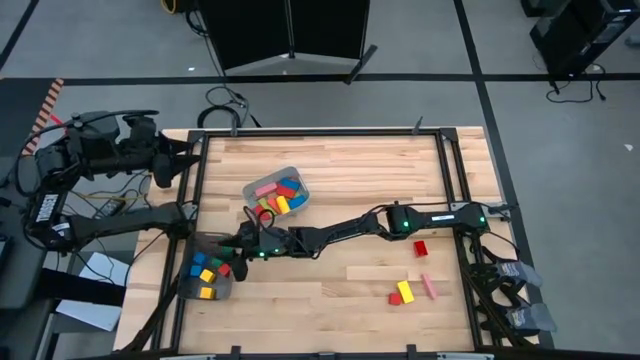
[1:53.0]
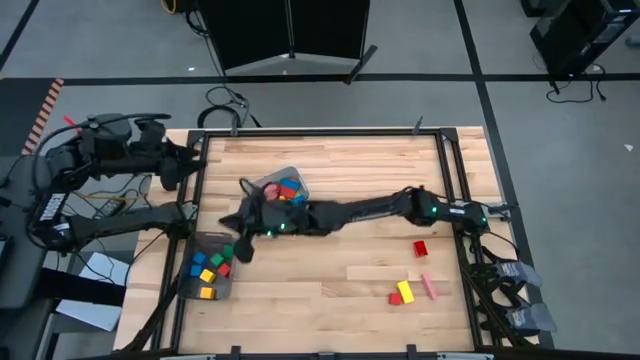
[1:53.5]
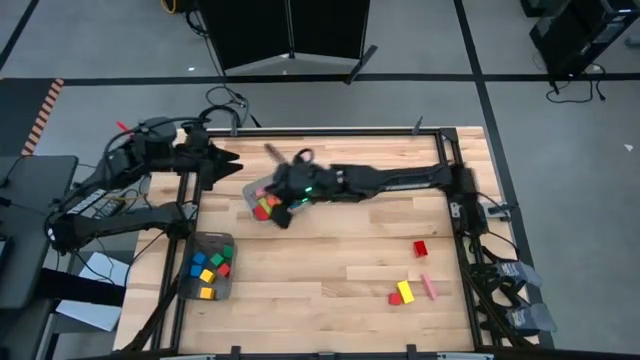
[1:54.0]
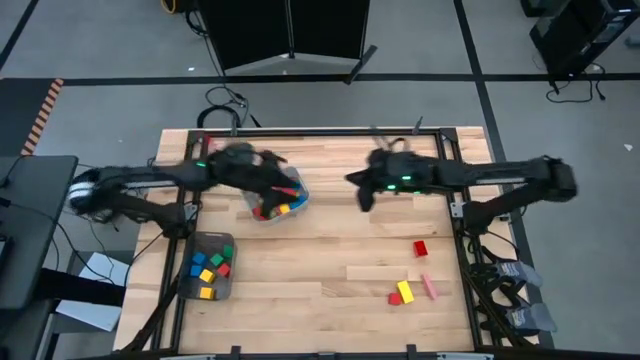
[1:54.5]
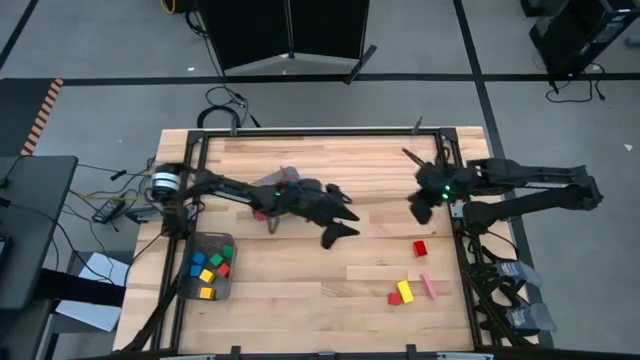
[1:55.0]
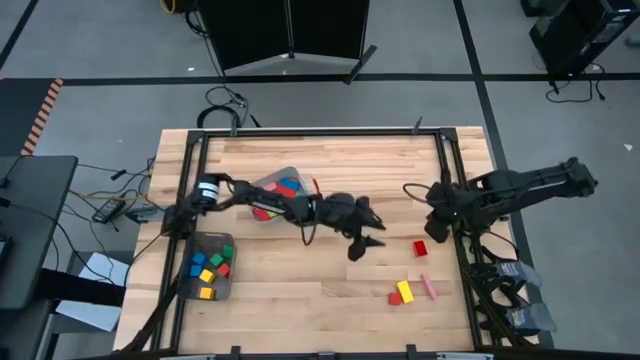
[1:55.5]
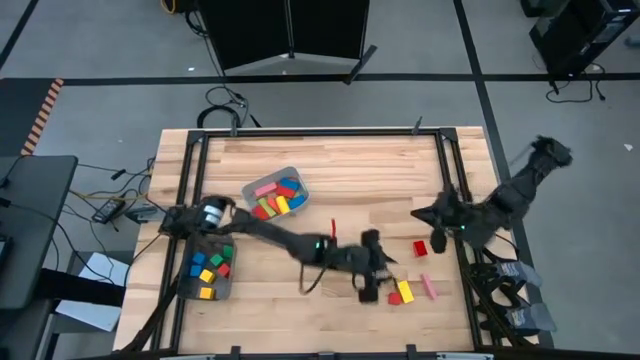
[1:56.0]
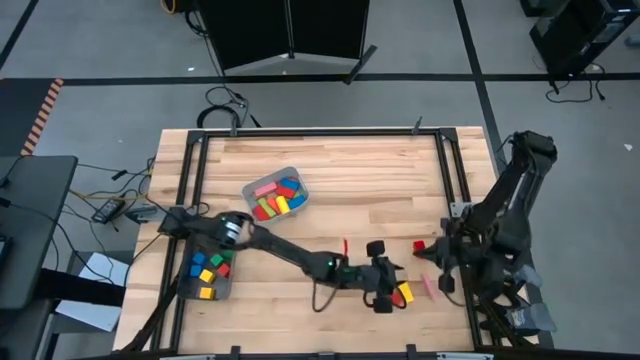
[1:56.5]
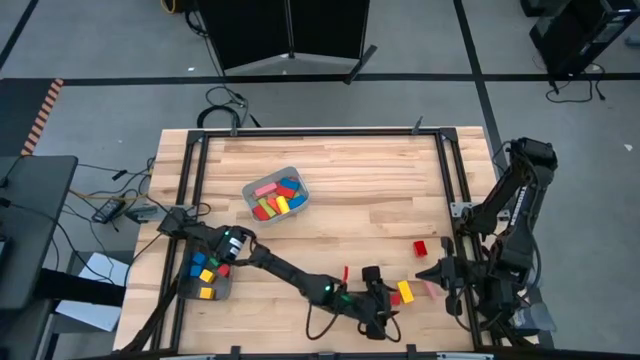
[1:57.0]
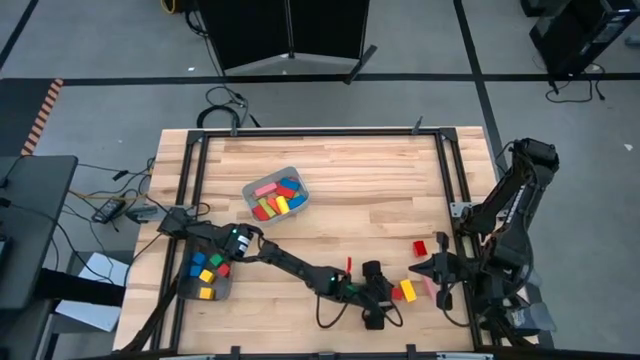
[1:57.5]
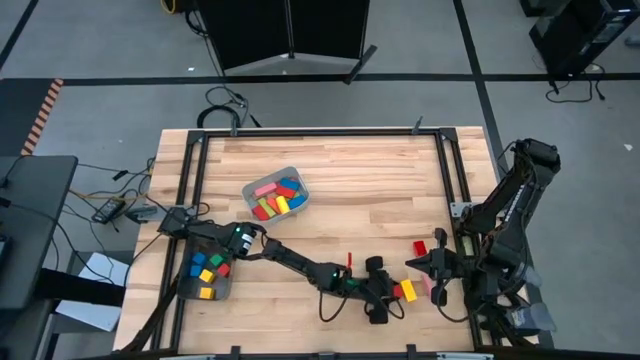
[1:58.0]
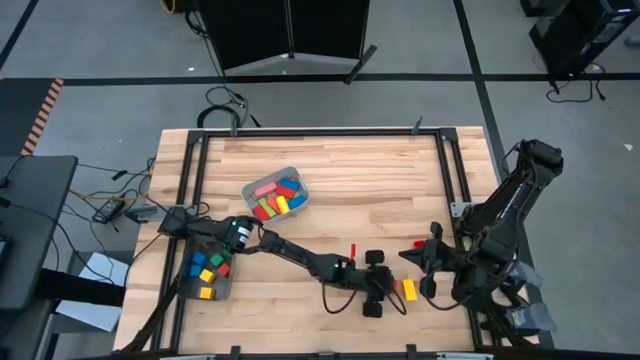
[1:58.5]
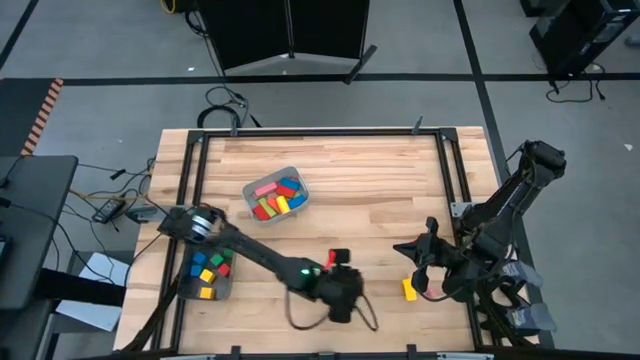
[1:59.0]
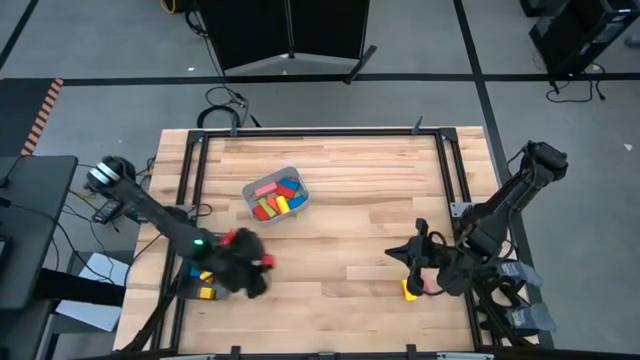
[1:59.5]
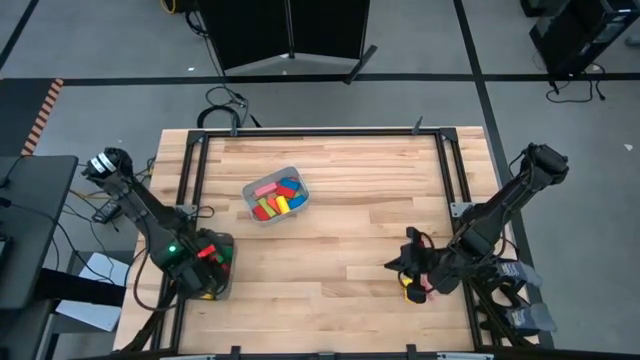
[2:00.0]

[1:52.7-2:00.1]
Task: Sort blocks by size
Put the orange square block into the black bin

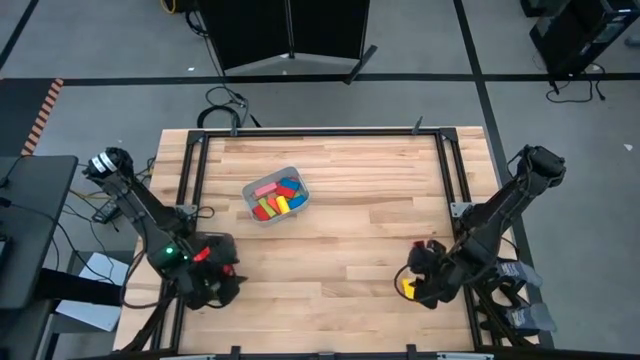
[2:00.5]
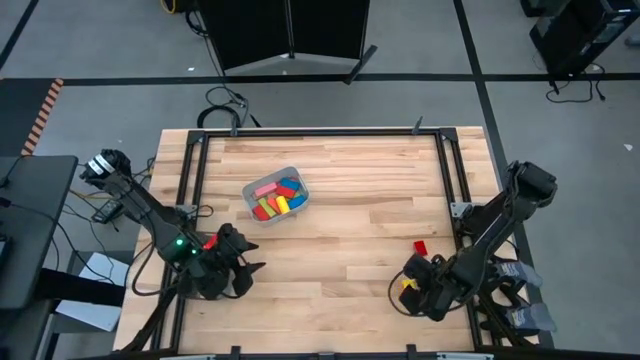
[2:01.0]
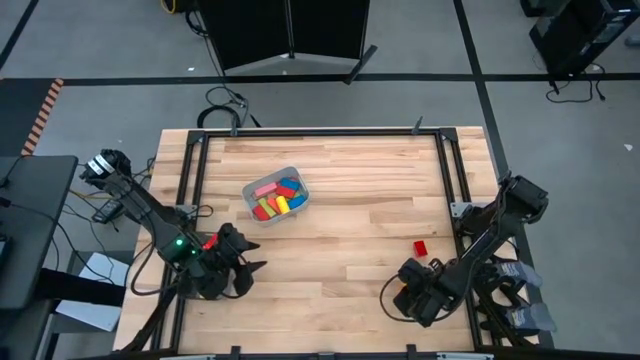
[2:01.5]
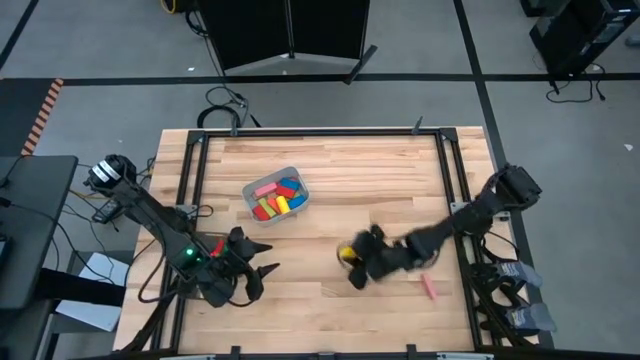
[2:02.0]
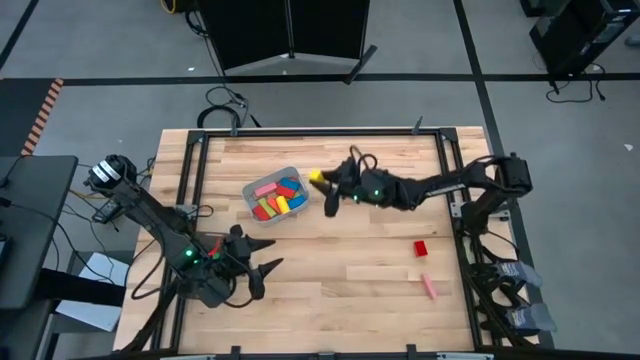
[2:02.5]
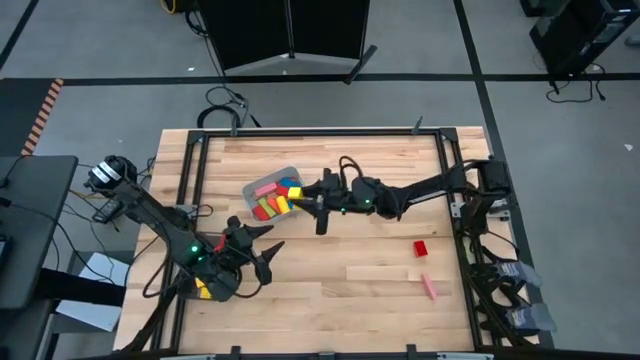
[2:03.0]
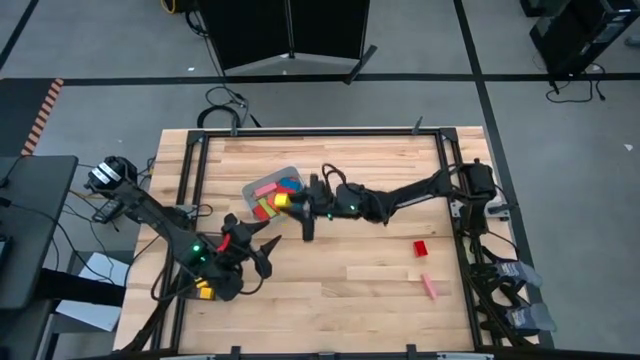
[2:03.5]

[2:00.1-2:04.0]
Put the yellow arch block into the gray bin

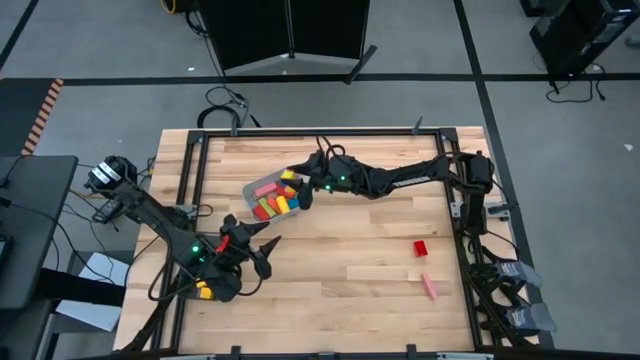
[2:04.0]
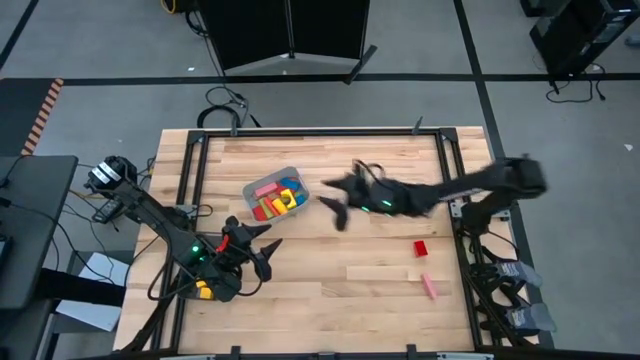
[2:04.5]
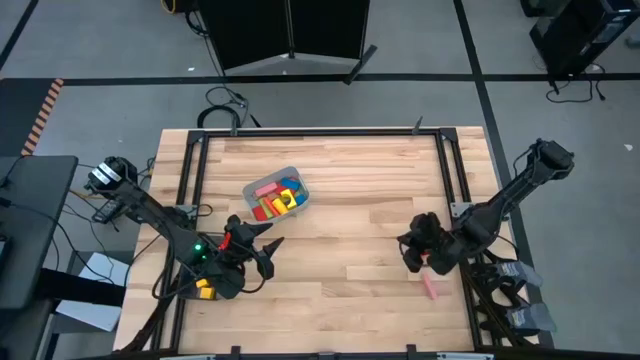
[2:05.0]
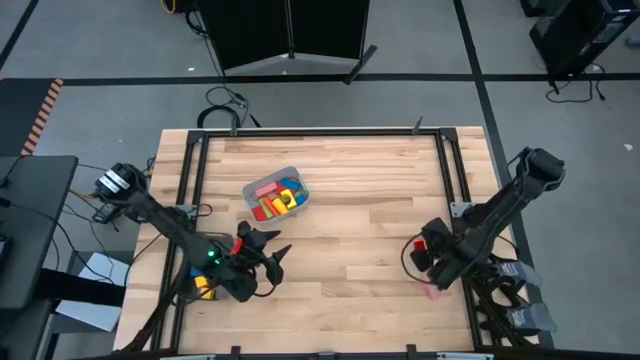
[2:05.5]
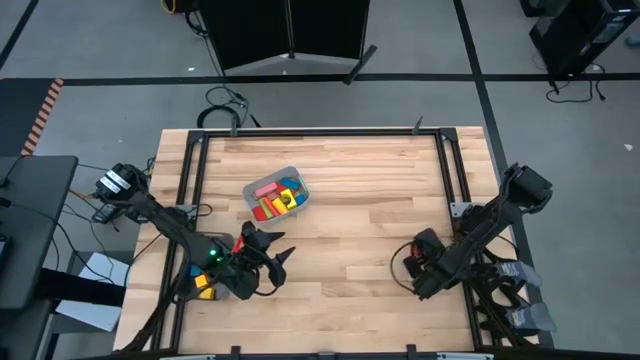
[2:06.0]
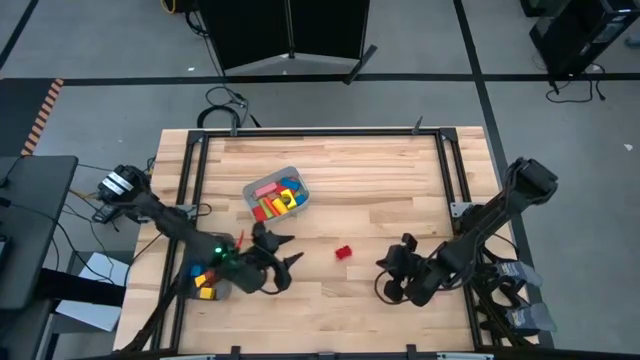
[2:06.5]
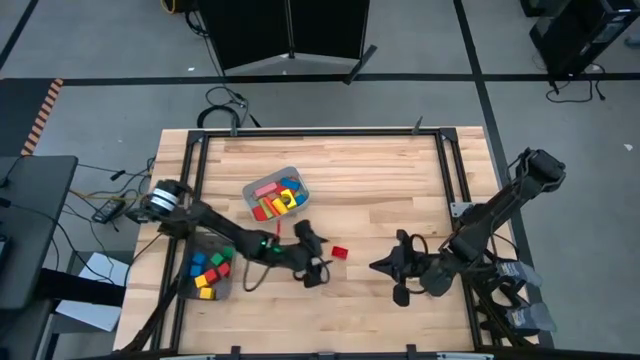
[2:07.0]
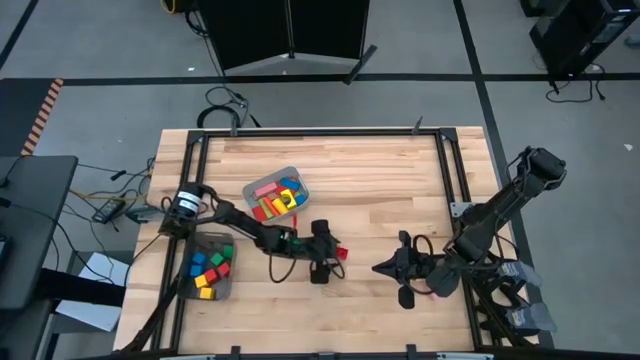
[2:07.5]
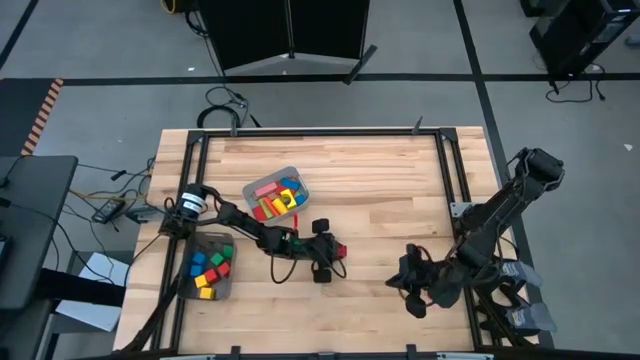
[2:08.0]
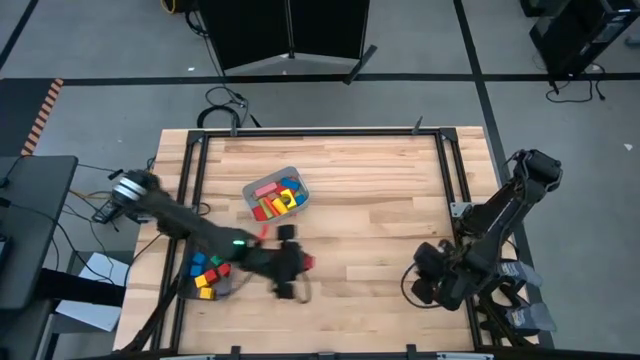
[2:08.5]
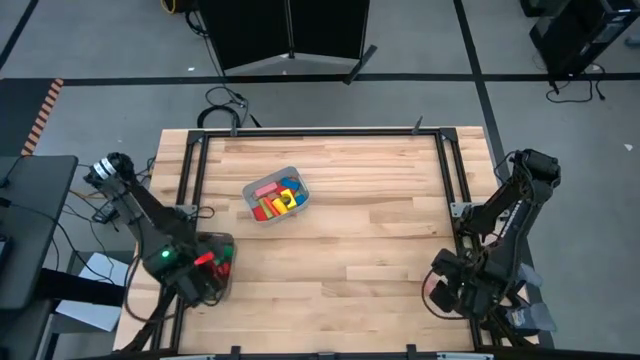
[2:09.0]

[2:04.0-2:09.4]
Put the orange game piece into the black bin

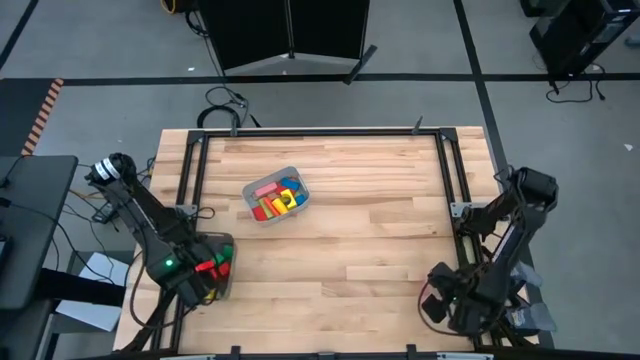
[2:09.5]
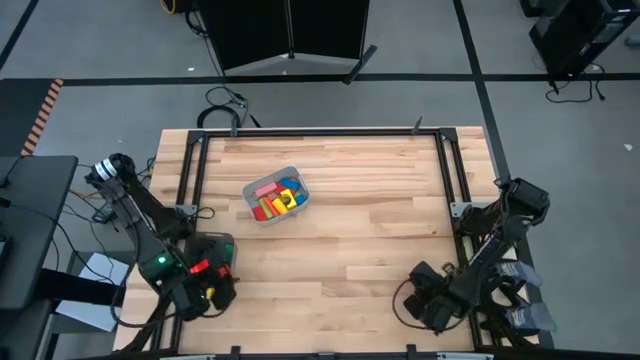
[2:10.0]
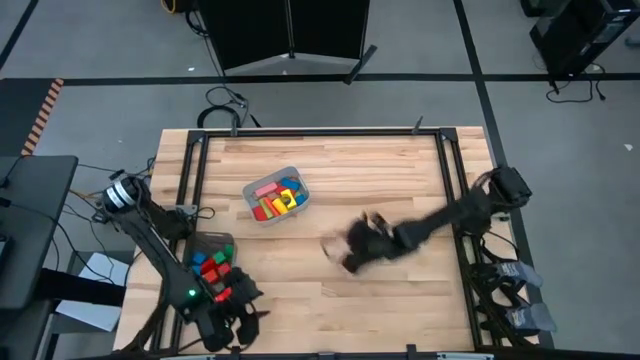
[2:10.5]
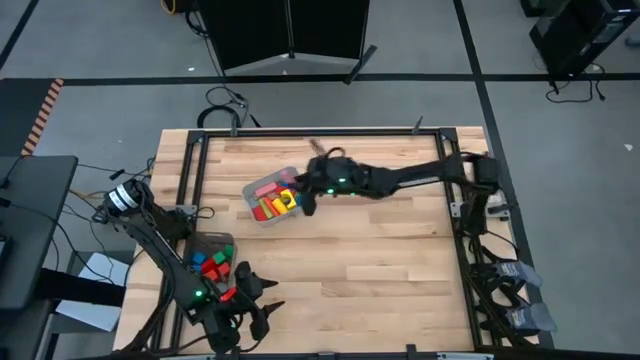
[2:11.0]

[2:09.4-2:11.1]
Put the pink rectangular block into the gray bin

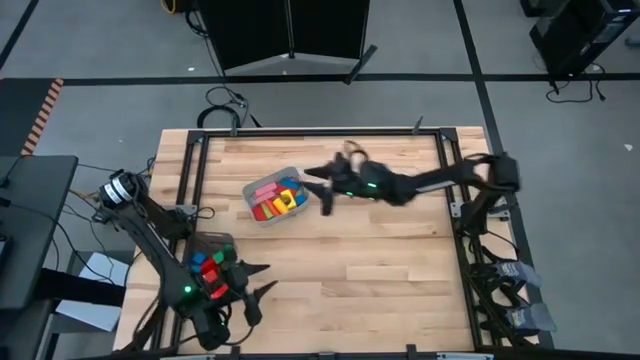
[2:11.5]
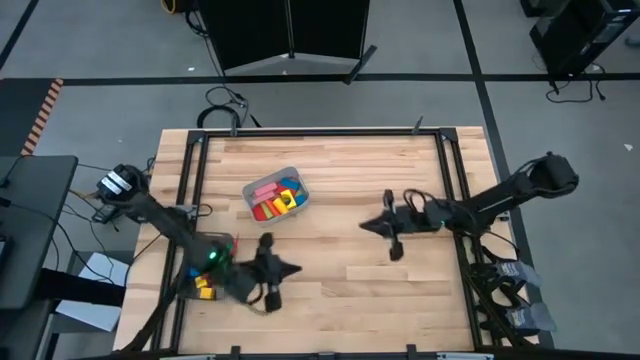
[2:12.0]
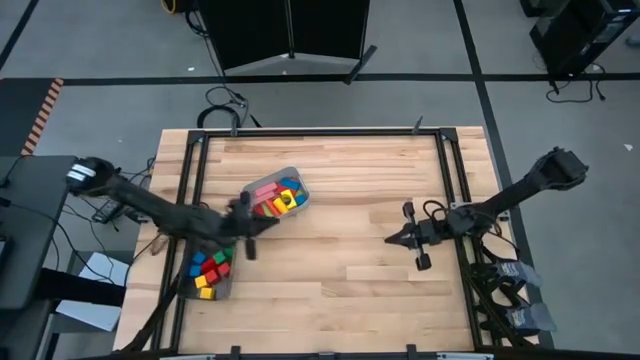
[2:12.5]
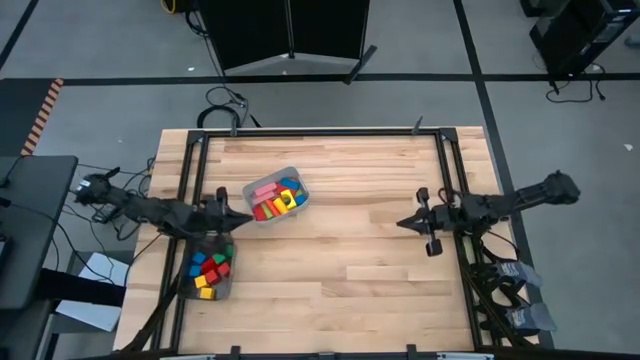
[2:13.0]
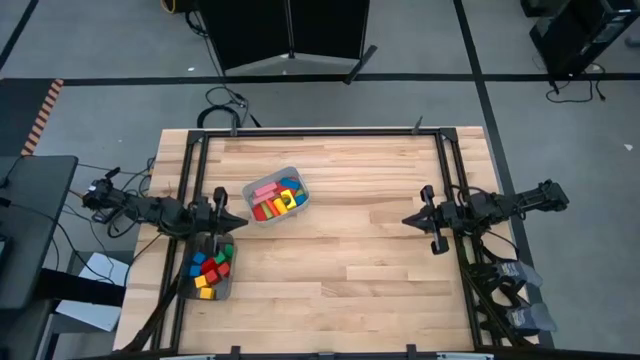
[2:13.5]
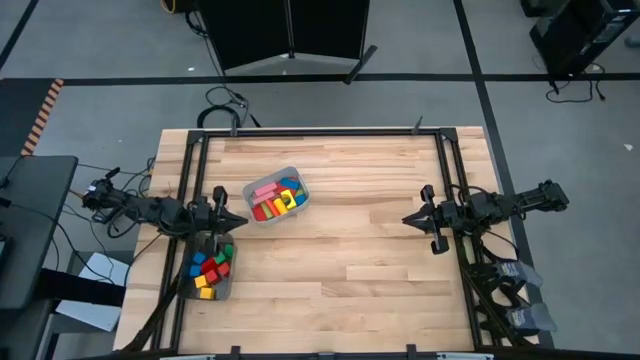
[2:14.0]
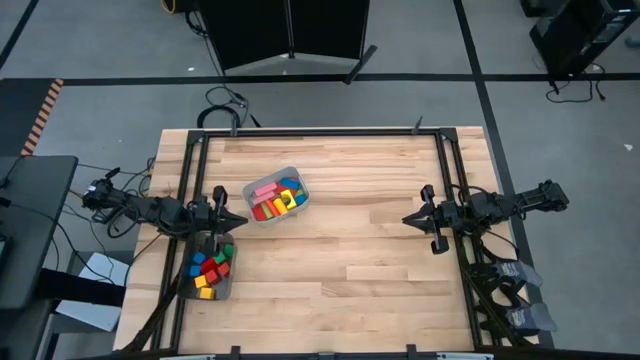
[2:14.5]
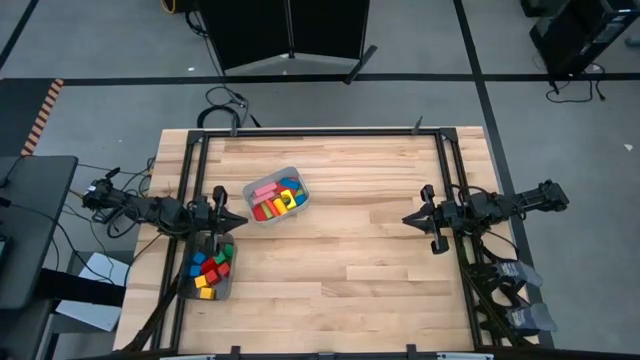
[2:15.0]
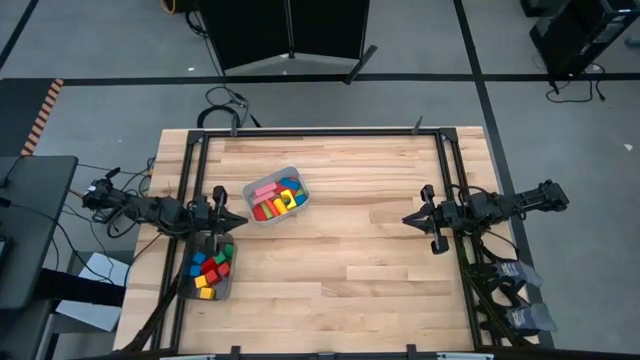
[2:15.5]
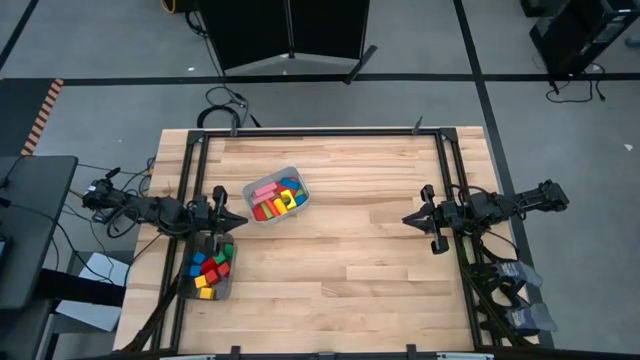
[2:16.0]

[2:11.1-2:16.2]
Return to Home Position
